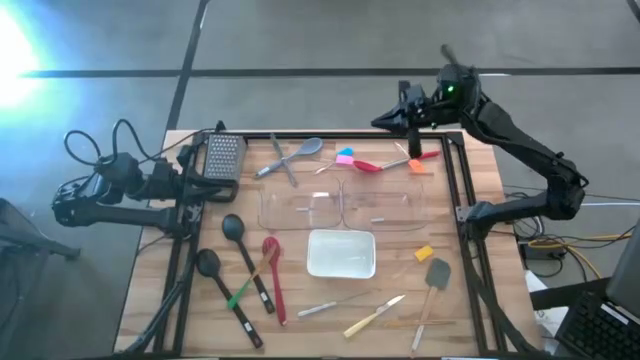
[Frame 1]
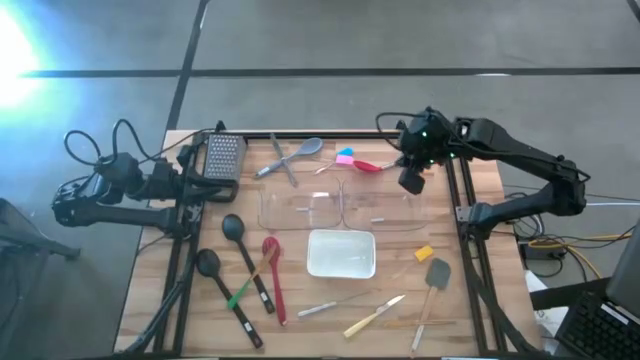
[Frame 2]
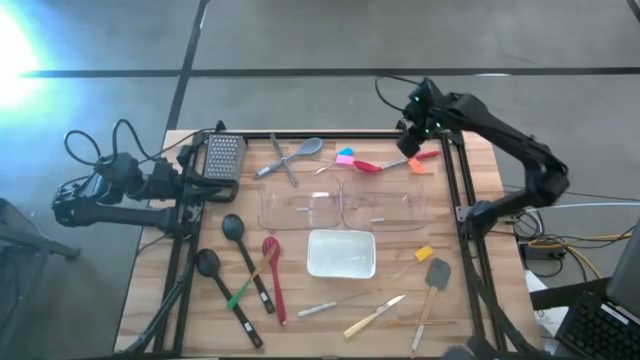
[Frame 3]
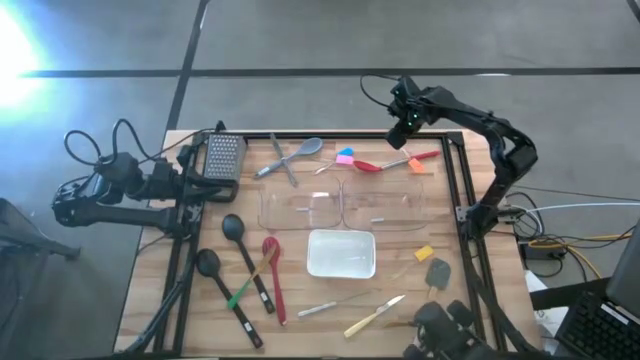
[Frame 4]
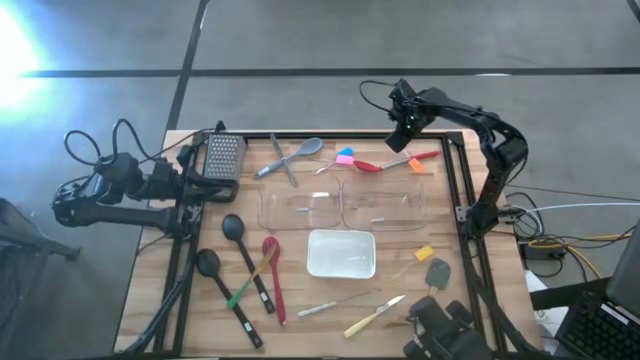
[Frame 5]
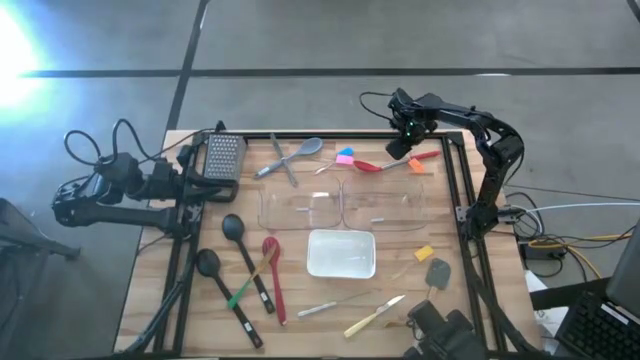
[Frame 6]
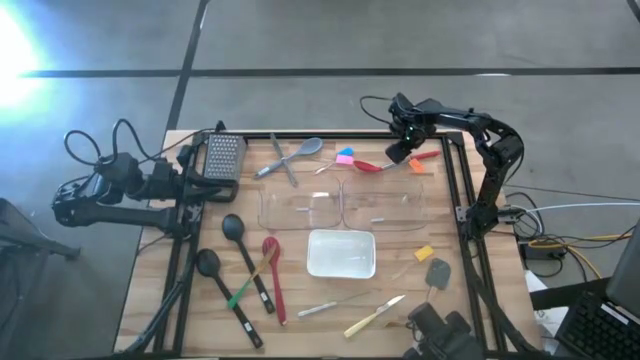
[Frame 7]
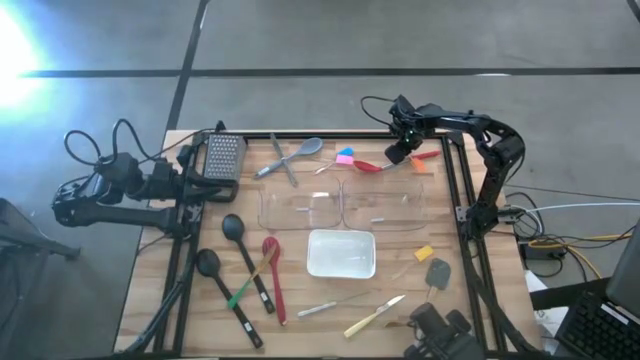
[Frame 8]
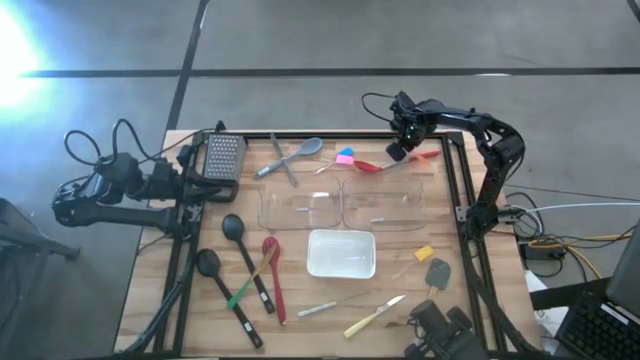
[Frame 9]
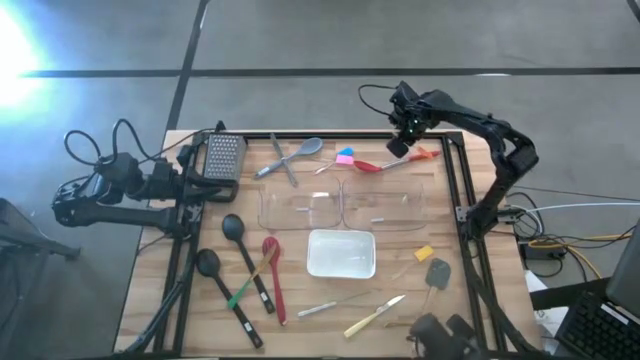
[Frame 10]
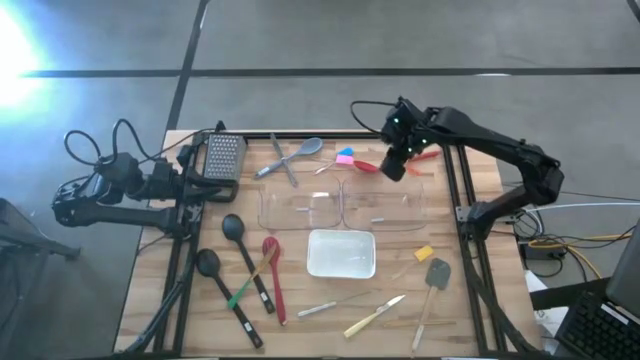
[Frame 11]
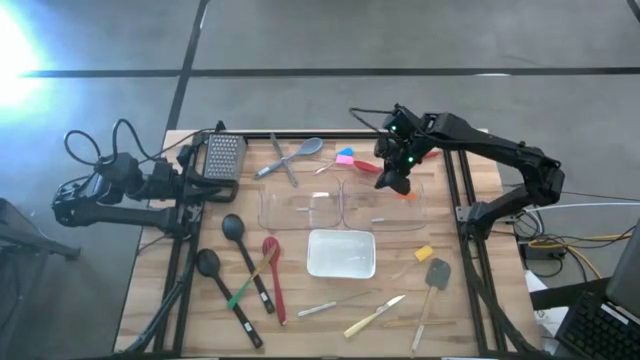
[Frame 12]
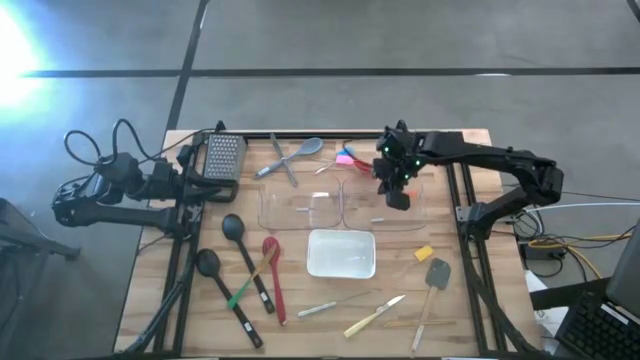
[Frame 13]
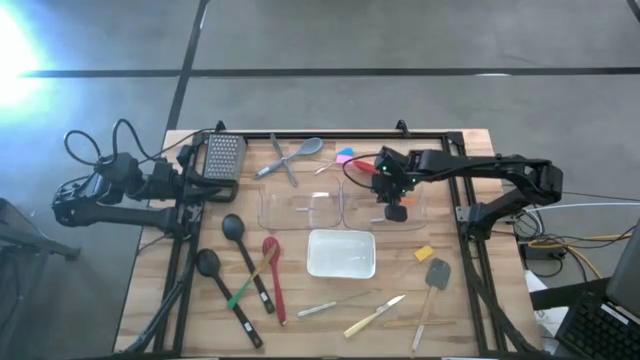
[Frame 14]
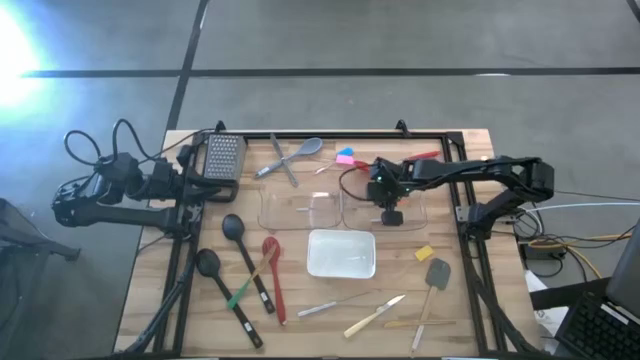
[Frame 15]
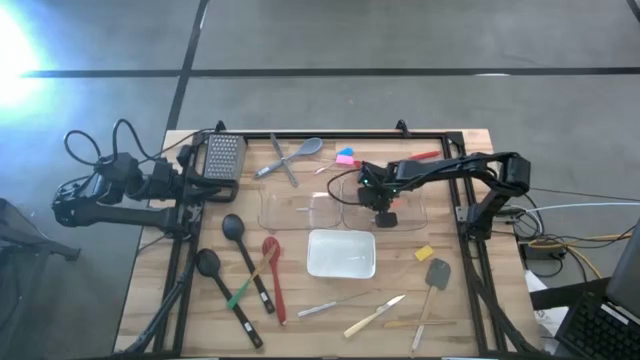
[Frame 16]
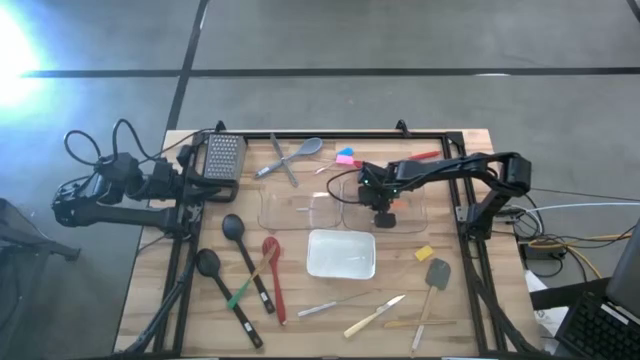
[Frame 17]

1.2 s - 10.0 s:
Task: Pick & Place Kitchen Items
Put the orange spatula into the right transparent bin

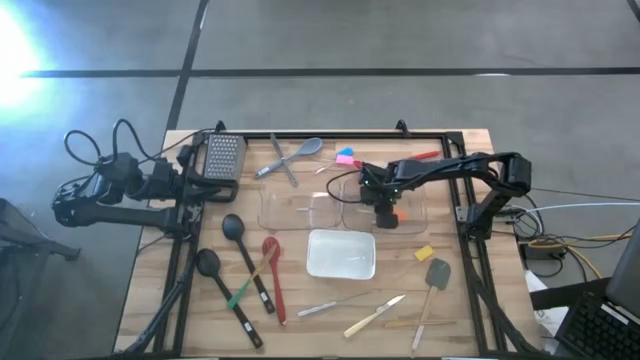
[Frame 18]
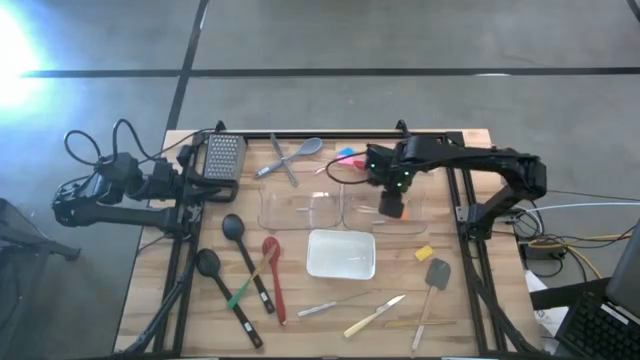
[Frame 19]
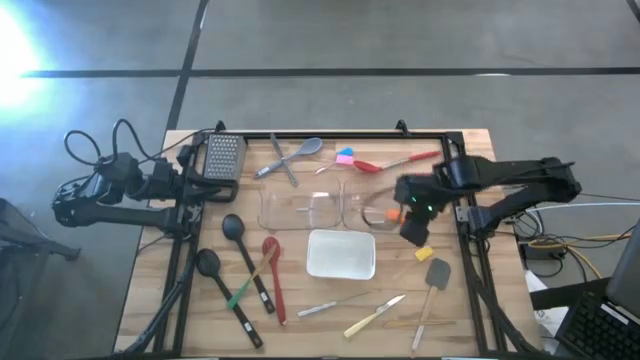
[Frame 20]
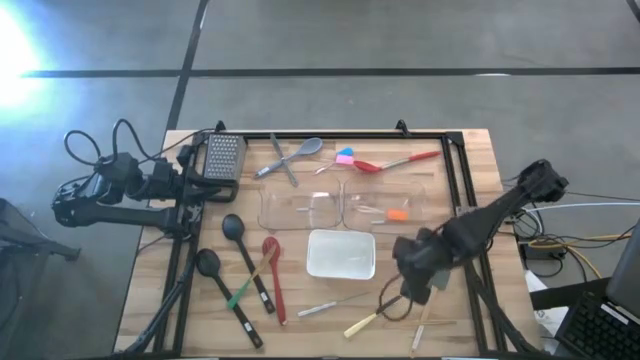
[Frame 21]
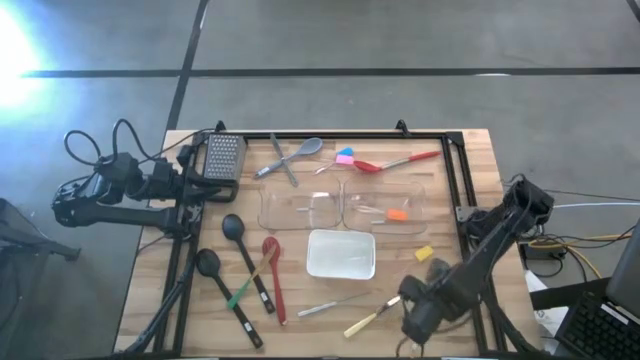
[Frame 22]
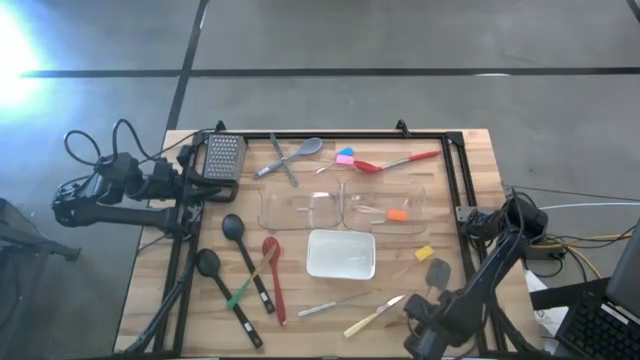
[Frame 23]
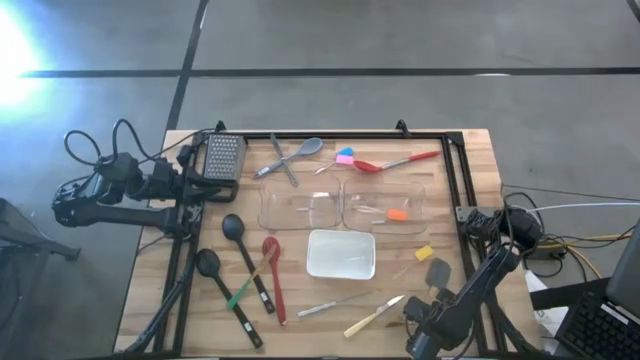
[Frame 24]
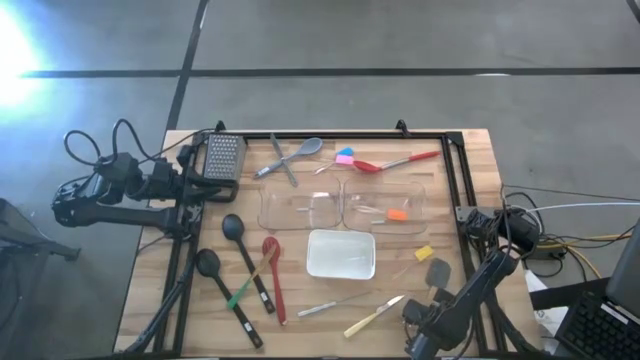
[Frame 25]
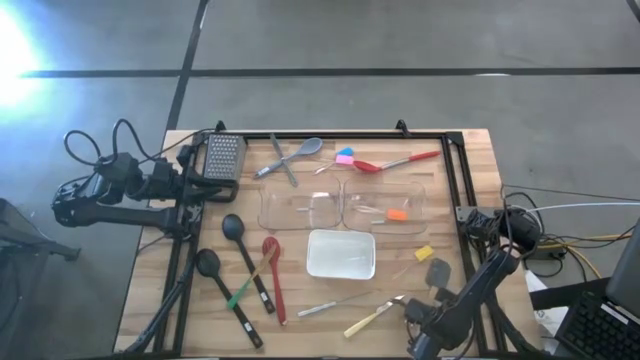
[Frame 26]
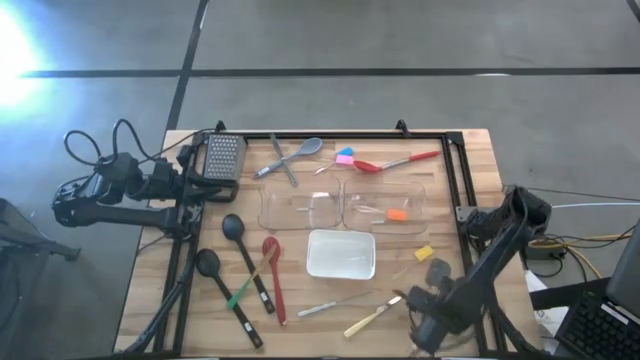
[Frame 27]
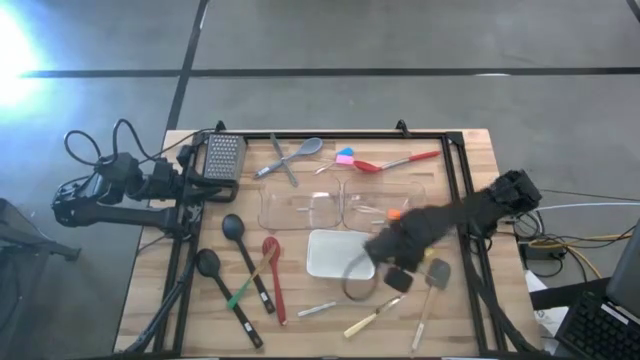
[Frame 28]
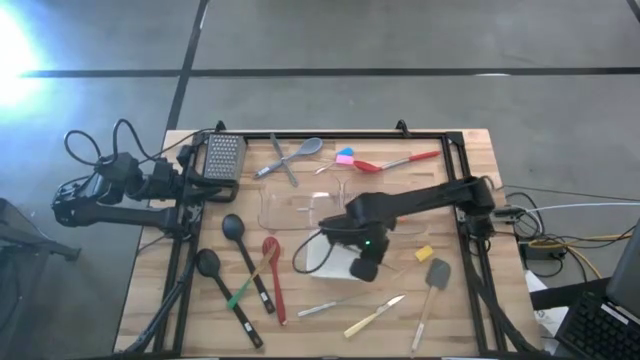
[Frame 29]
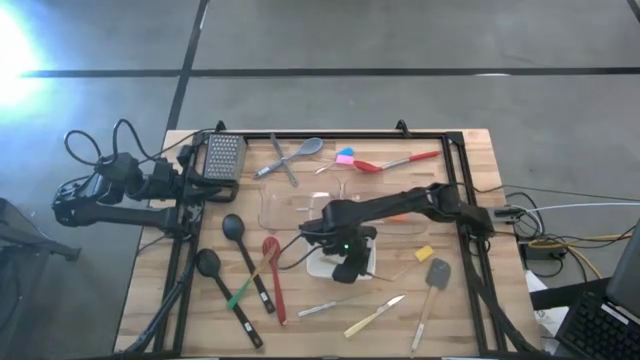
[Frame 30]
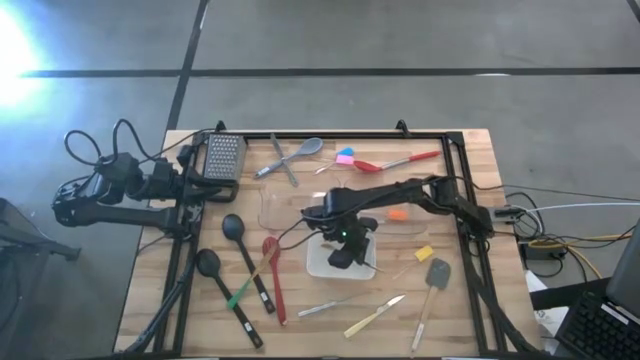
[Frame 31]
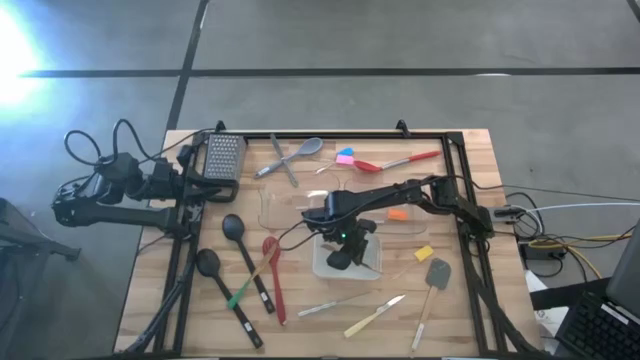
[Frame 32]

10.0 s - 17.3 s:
Put the gold knife into the white bin

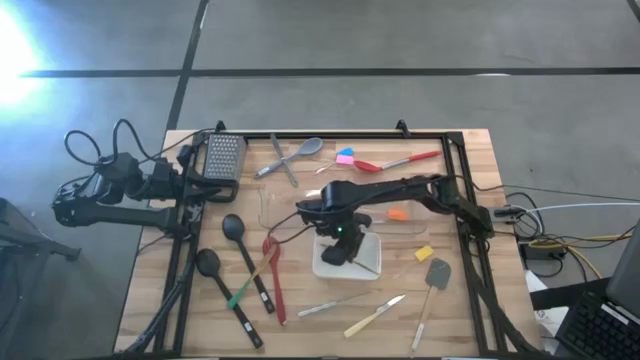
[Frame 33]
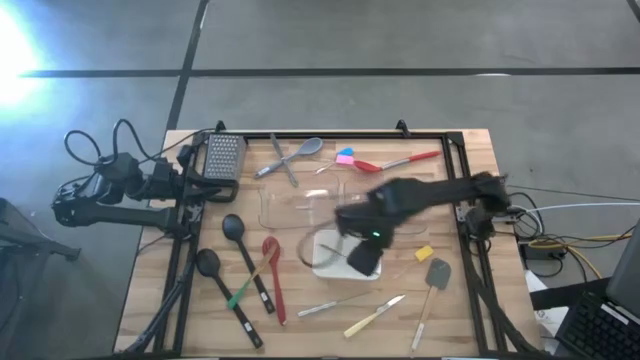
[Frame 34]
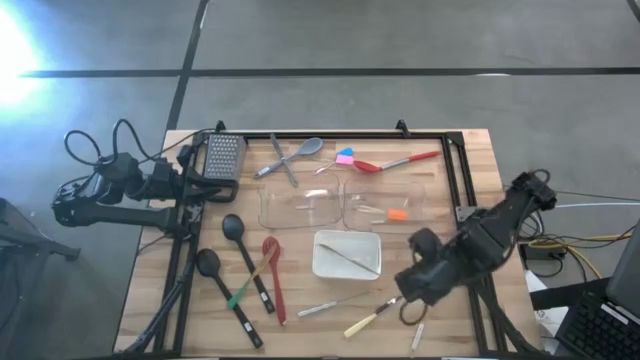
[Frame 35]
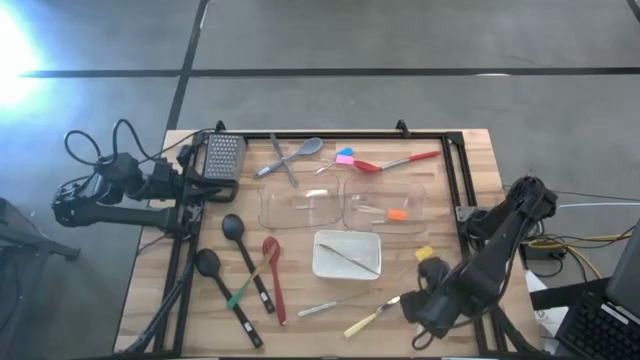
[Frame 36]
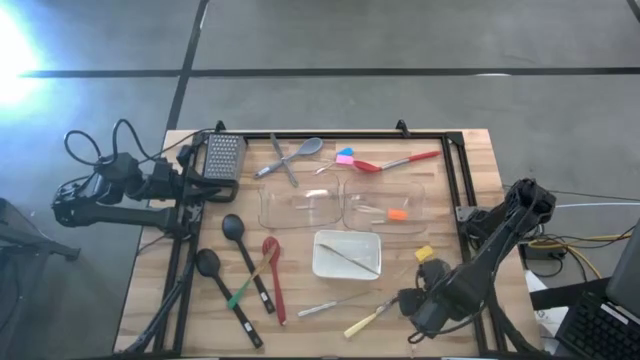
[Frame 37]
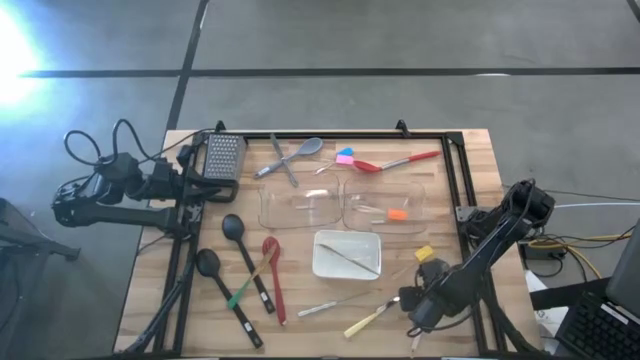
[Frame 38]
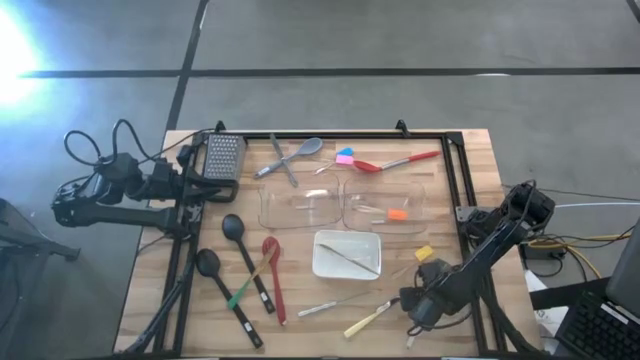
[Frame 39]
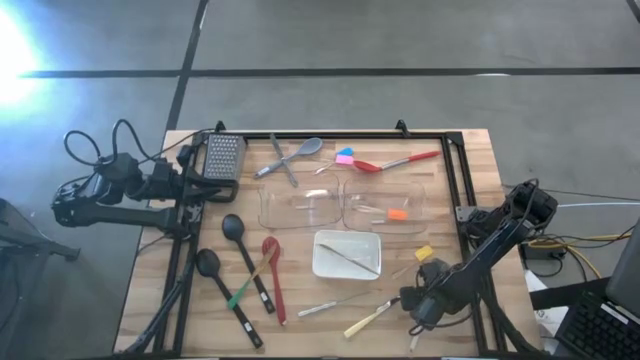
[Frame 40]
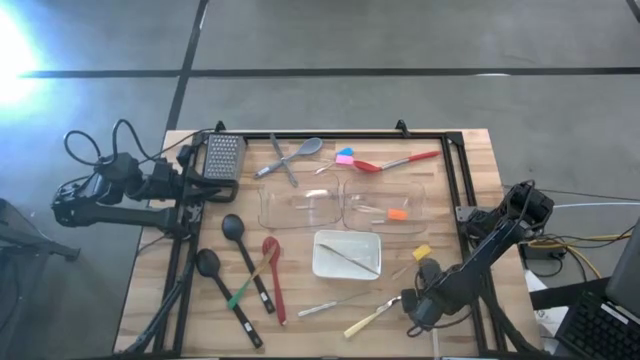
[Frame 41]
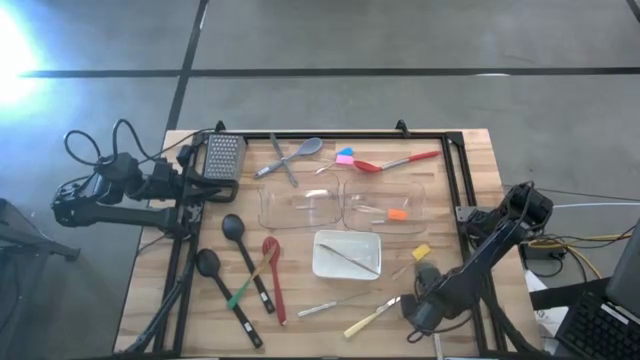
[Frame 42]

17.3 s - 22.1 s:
Put the gray spatula into the right transparent bin
